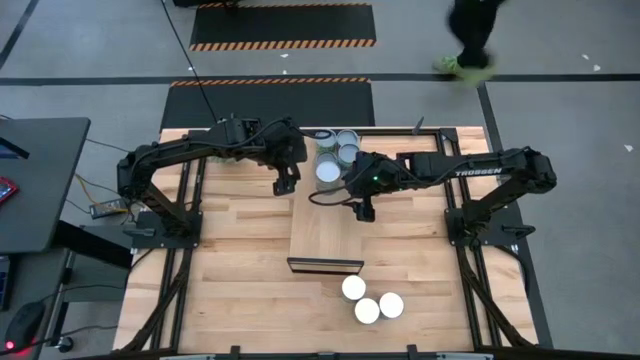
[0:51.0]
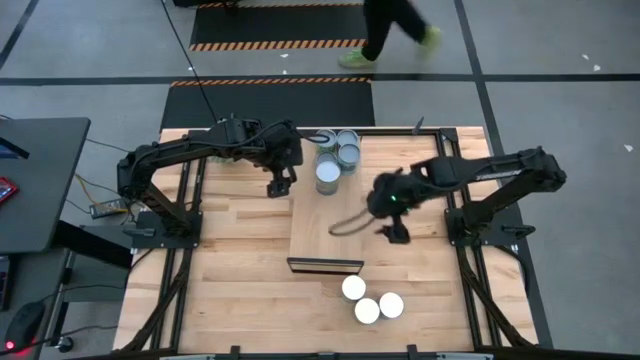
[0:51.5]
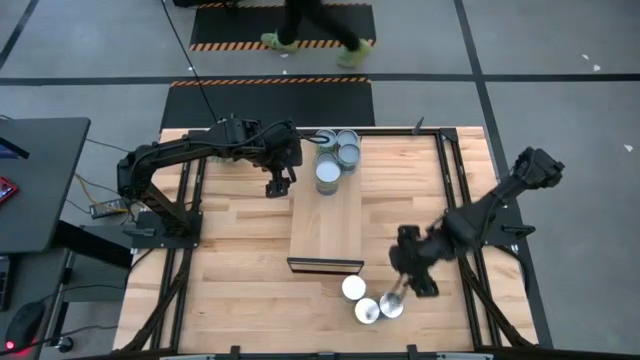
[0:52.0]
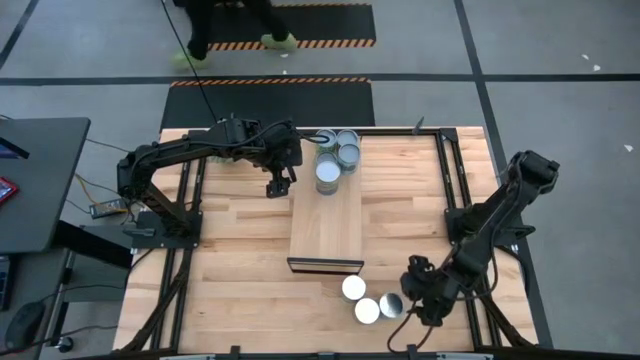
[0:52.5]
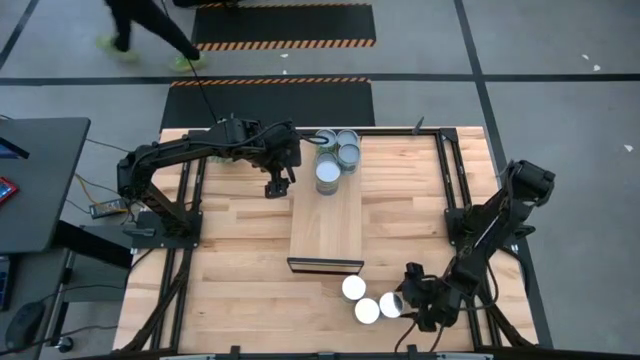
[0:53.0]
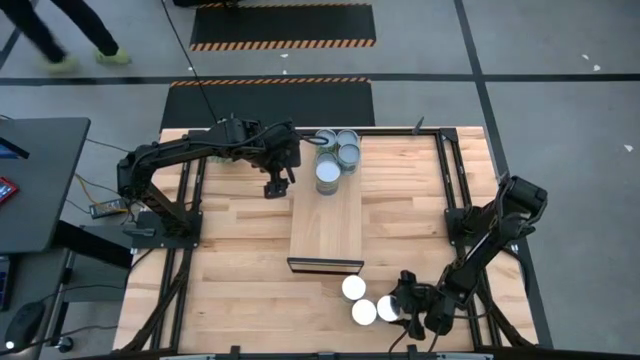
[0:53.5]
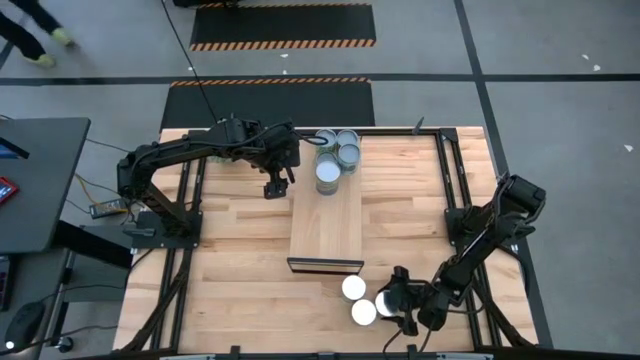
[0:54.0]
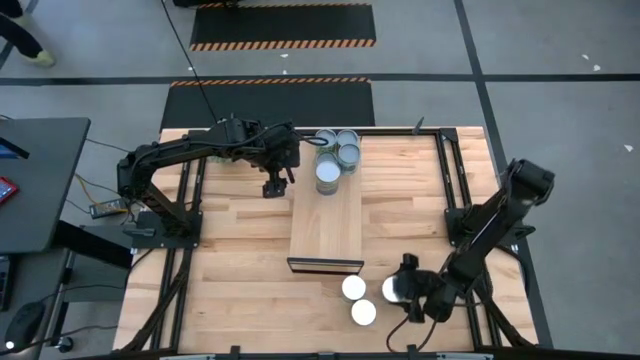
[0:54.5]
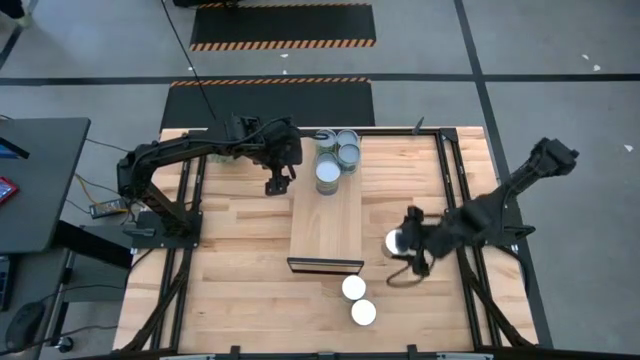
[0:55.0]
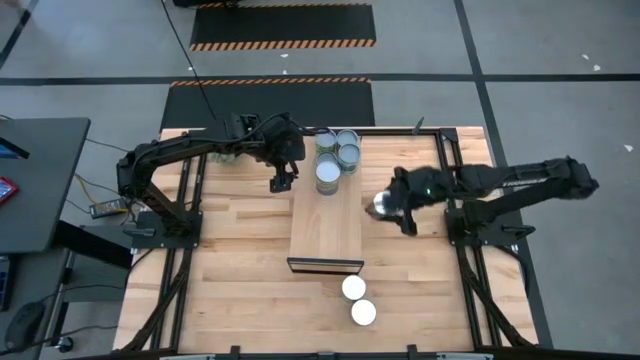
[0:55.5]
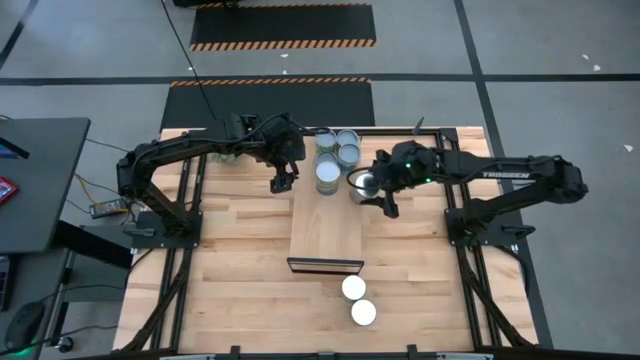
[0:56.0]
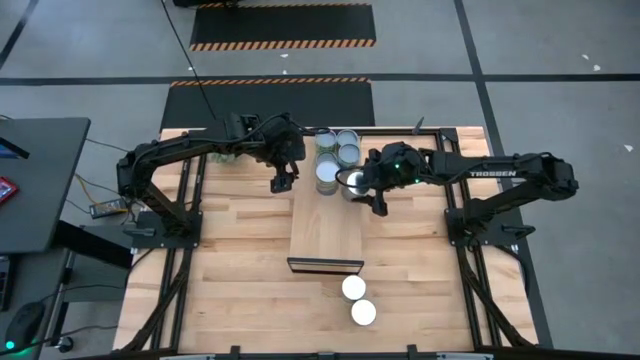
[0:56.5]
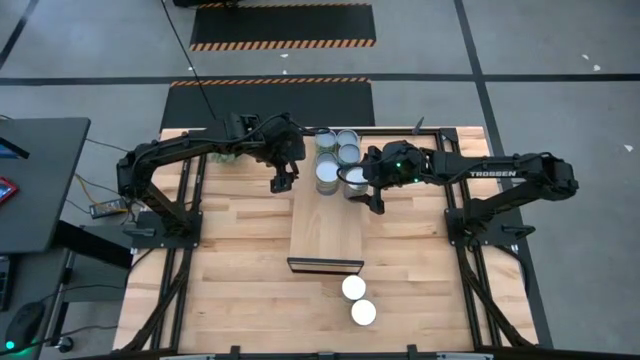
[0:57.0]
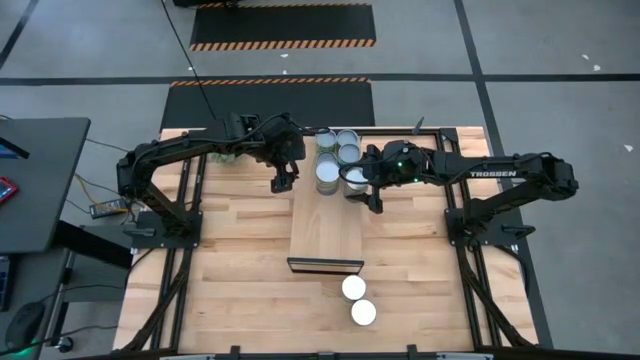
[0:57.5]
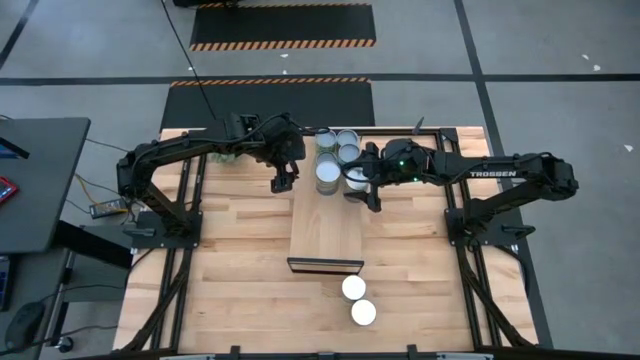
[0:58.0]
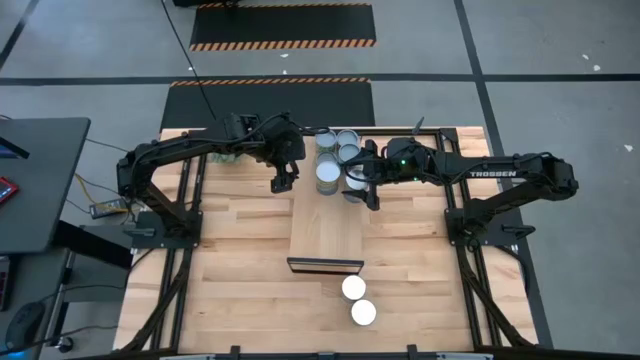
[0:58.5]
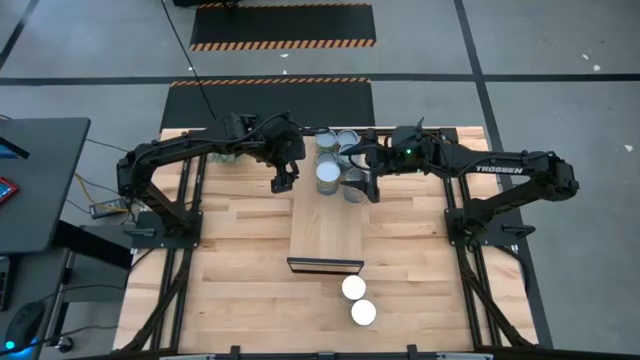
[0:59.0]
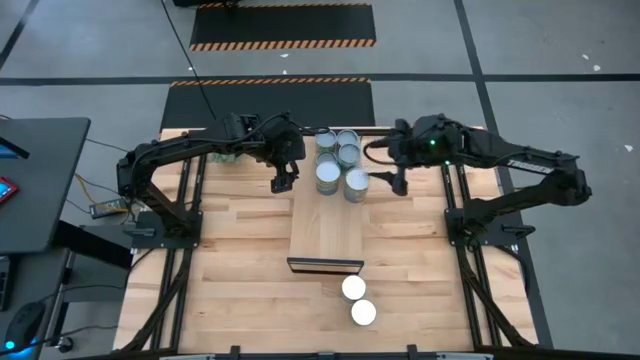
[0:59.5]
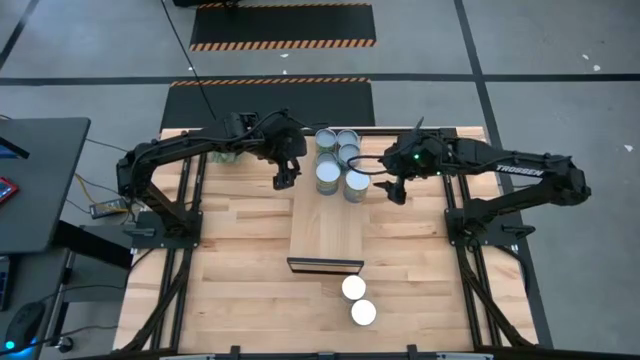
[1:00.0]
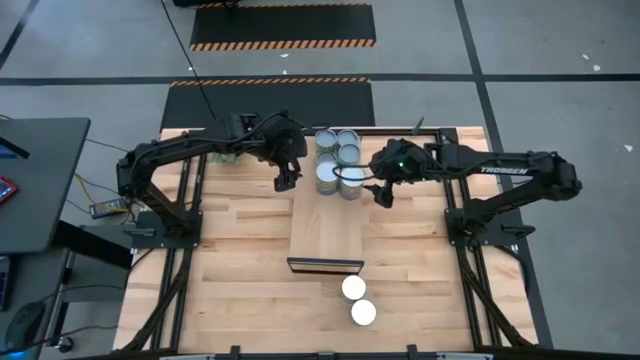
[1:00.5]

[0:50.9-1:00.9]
Task: Pick and place cans onto a shelf
Put the large canned peaches on the shelf

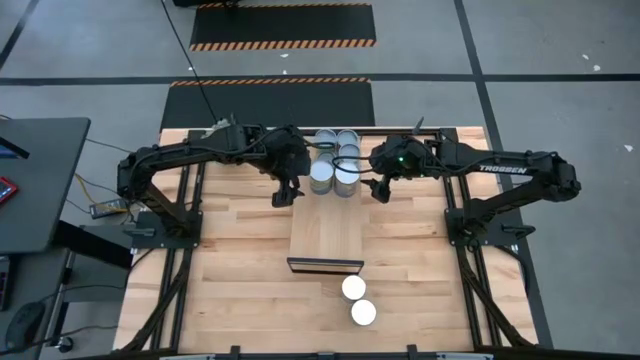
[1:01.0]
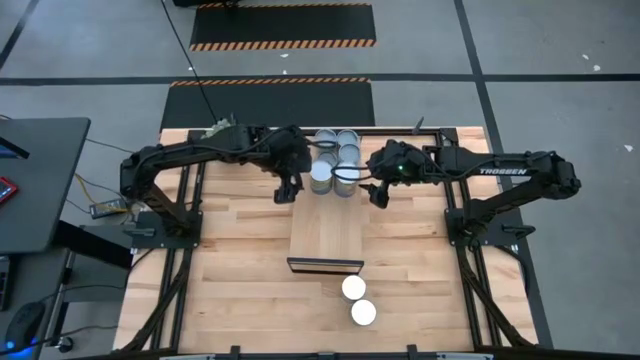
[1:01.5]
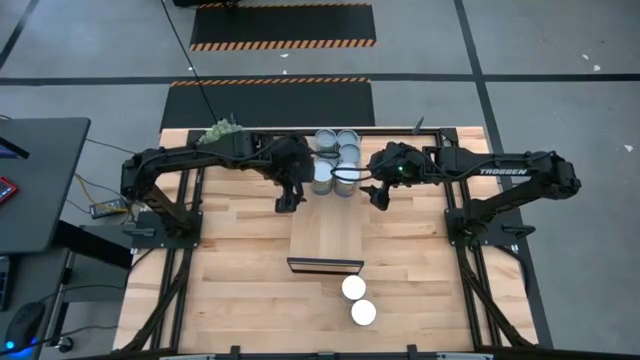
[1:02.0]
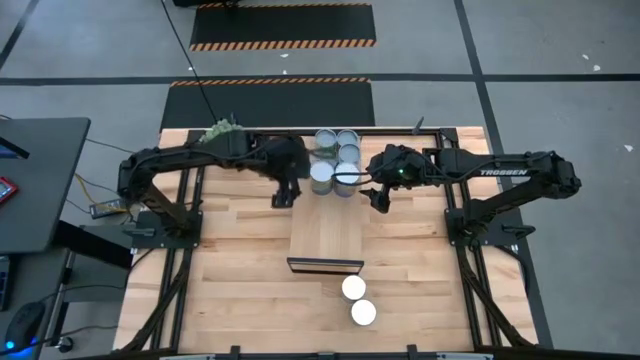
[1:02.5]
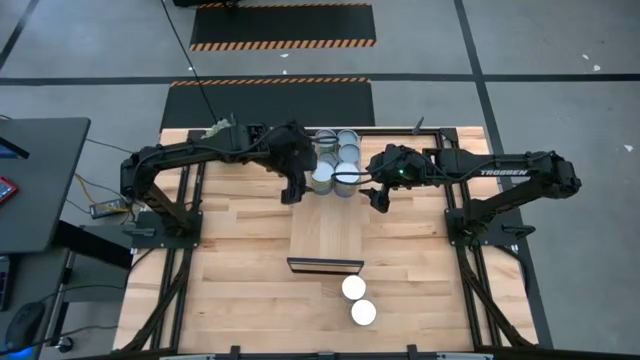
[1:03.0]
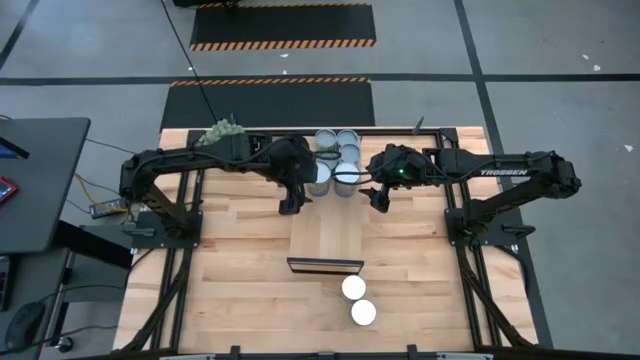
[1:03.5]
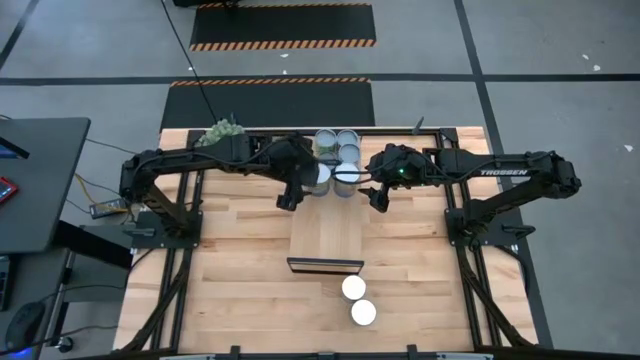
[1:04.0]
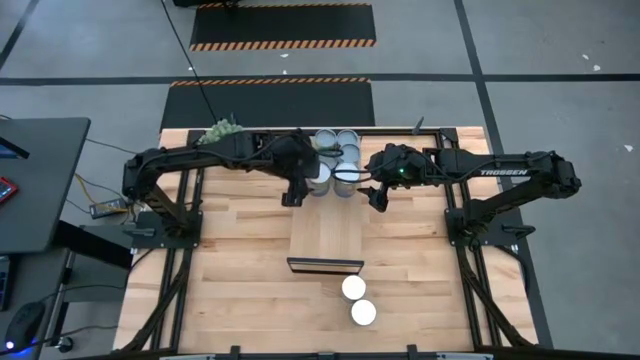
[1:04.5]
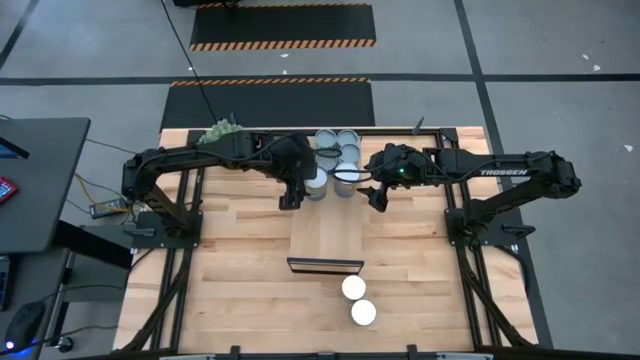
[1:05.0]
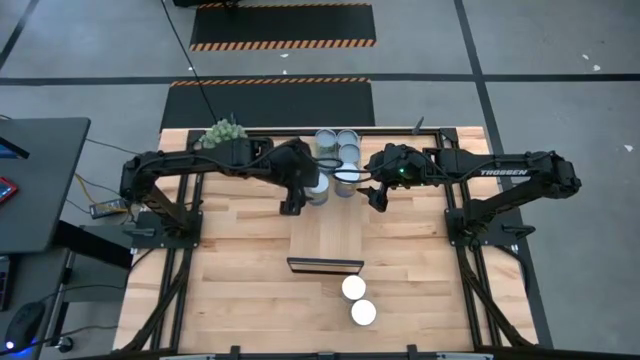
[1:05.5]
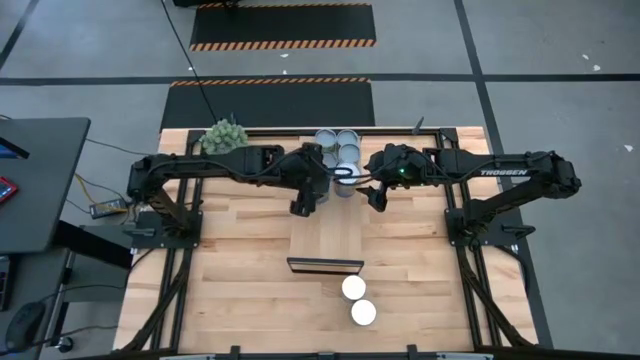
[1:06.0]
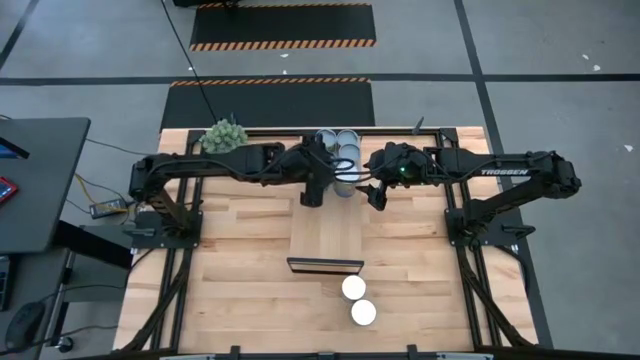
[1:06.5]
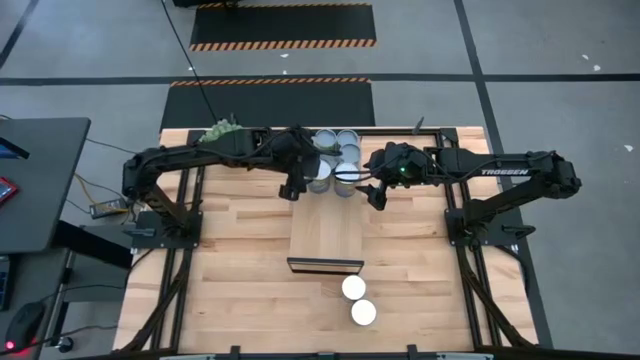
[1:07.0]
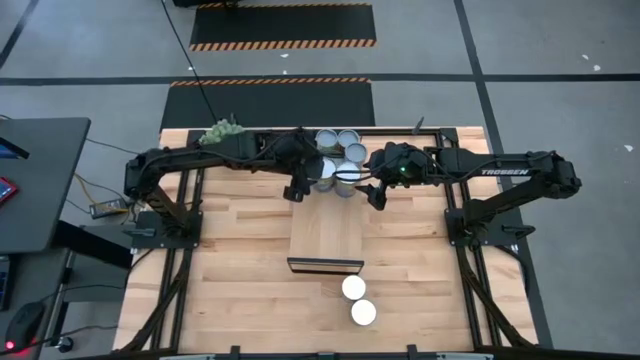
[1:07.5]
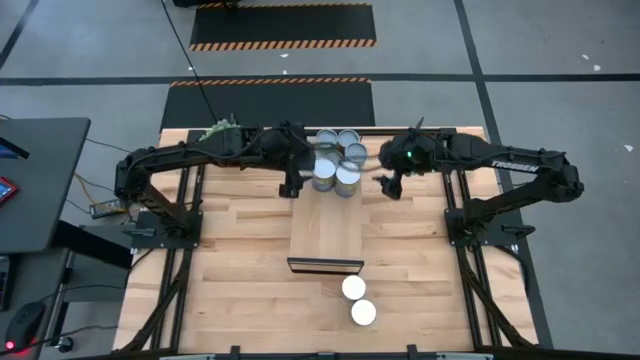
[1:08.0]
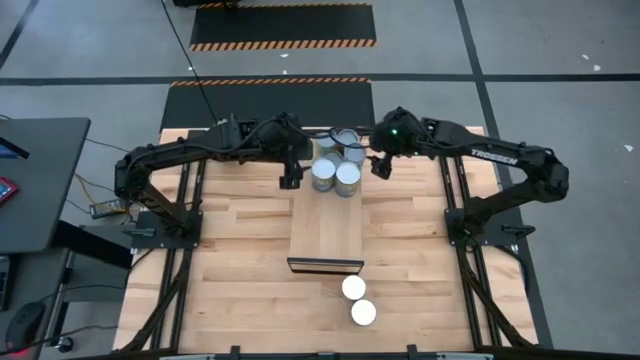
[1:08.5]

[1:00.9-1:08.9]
Adjust the canned goods on the shelf

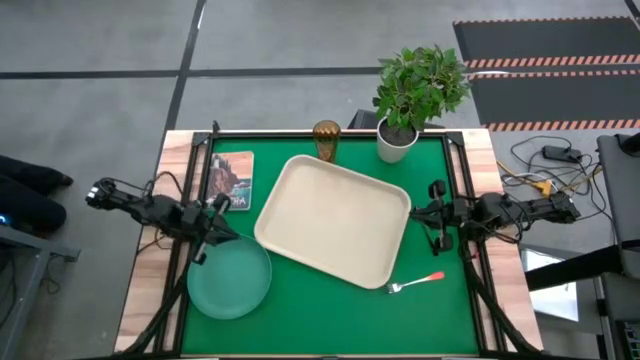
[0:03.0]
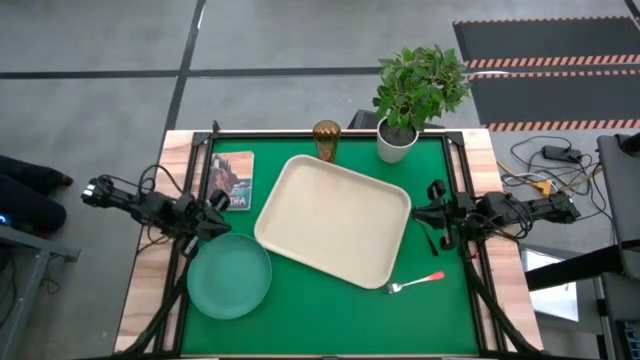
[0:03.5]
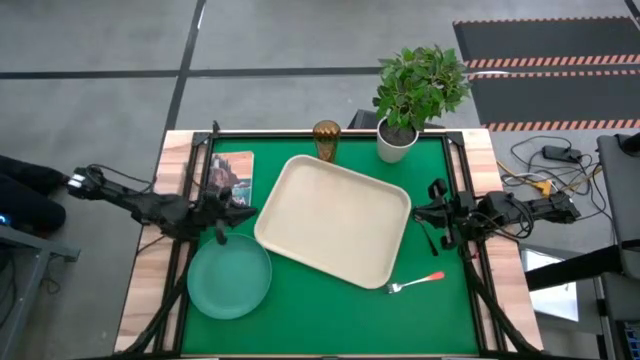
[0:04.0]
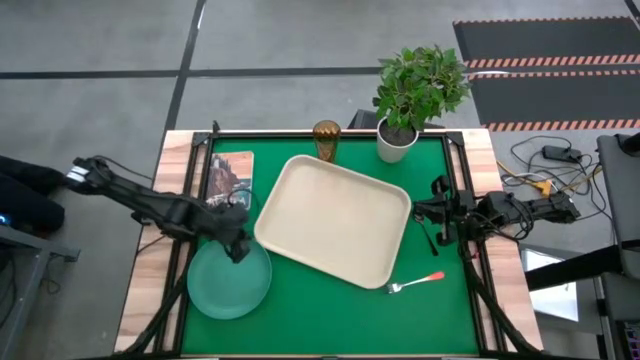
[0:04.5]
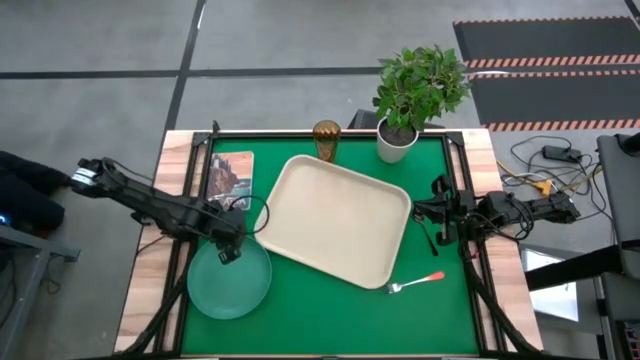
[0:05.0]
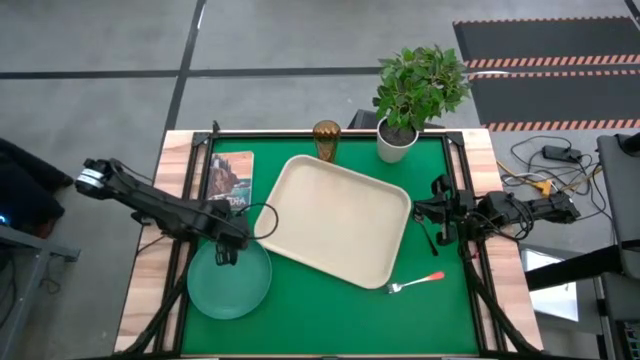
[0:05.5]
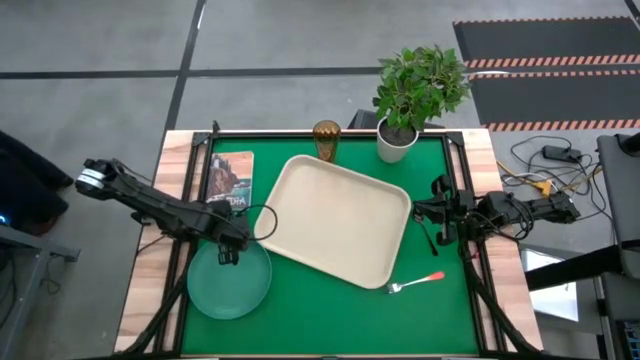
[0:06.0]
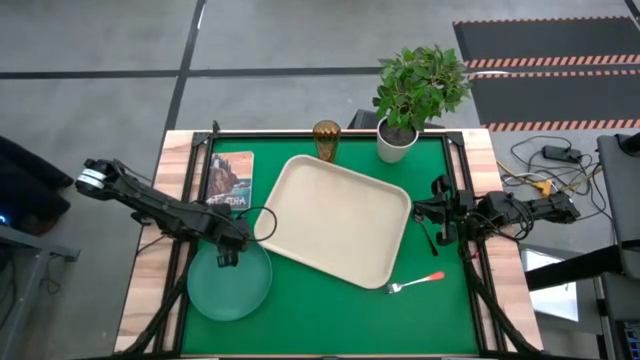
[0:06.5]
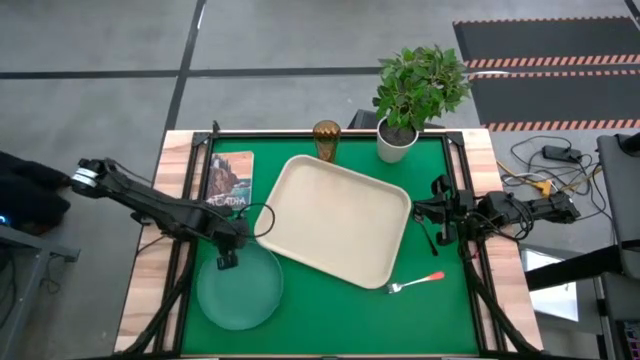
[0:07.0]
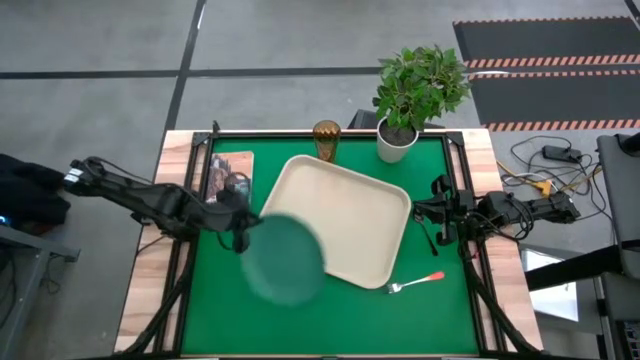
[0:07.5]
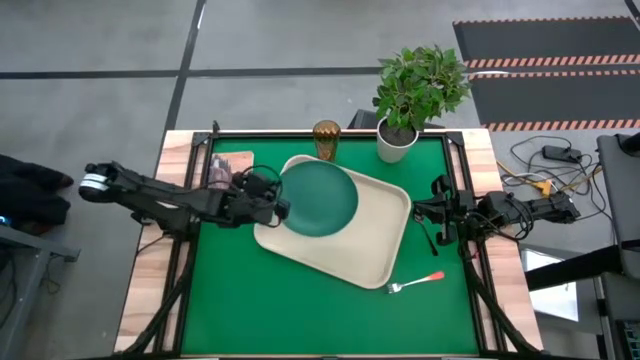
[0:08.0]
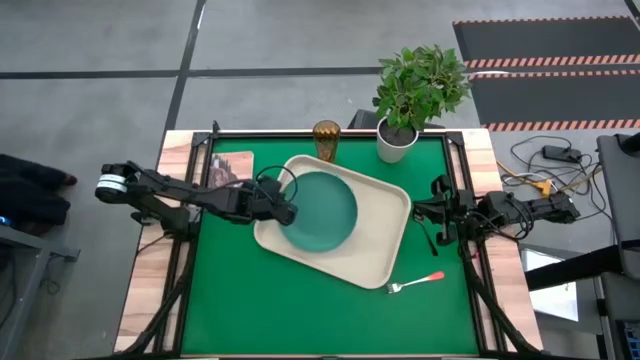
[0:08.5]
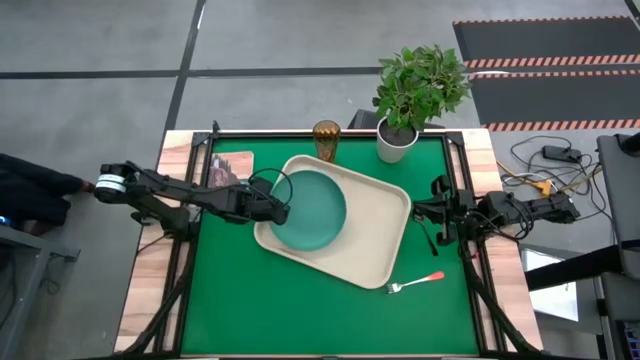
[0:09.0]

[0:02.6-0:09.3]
Task: Pick and place plate/cup/fork/spoon on tray
Put the green plate on the left side of the tray
